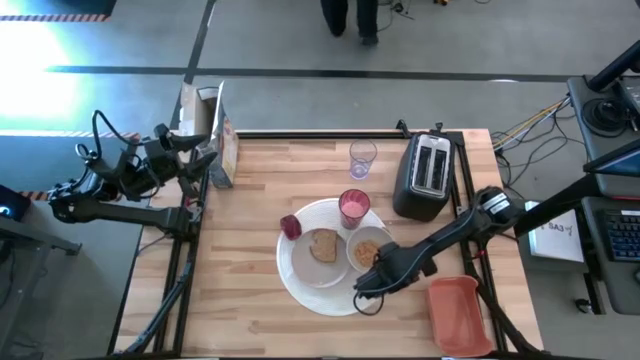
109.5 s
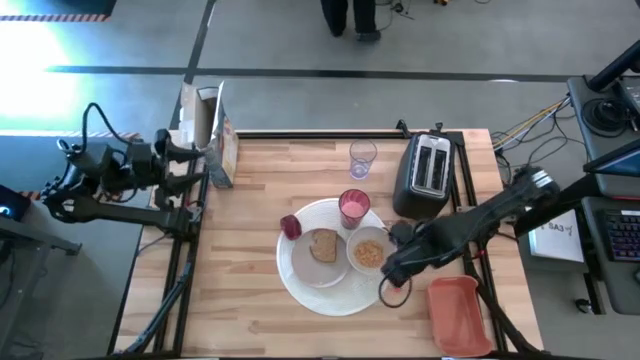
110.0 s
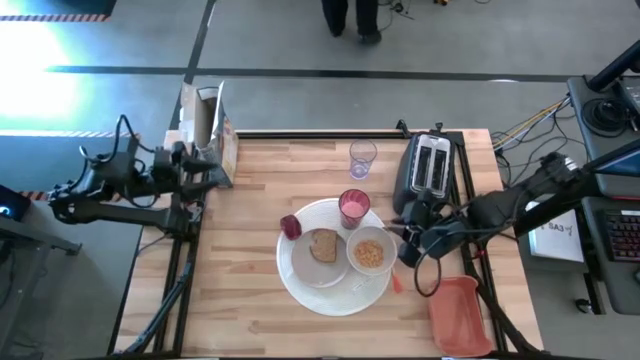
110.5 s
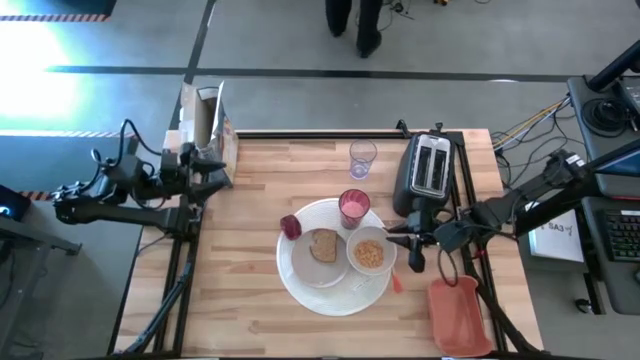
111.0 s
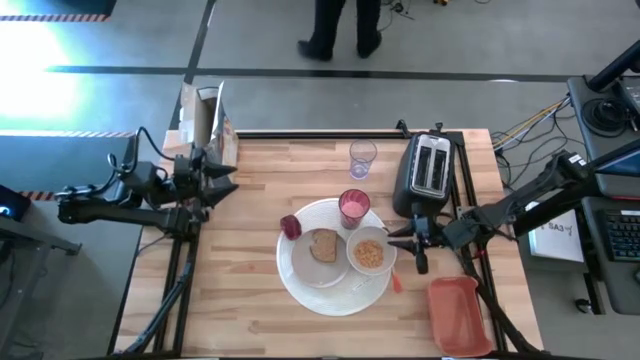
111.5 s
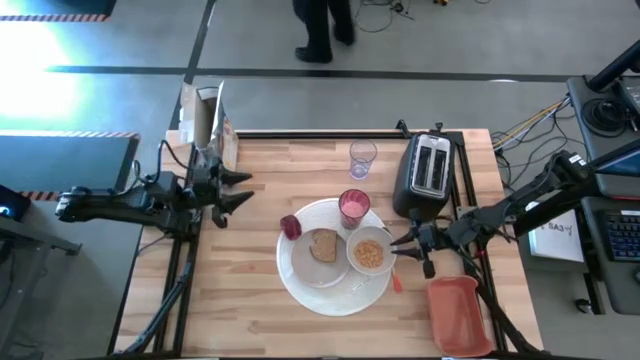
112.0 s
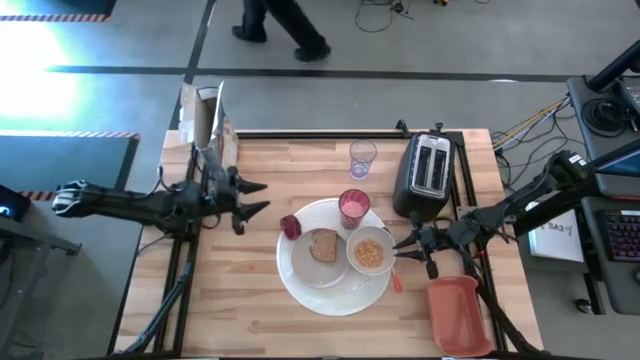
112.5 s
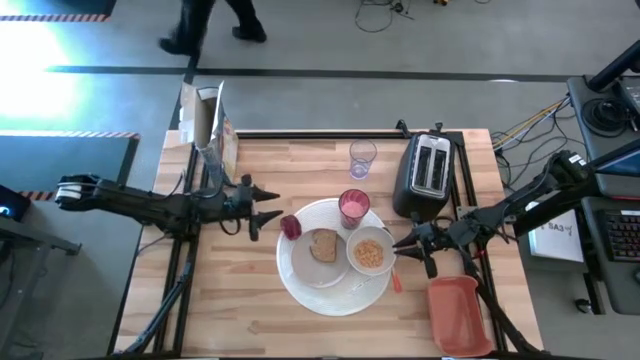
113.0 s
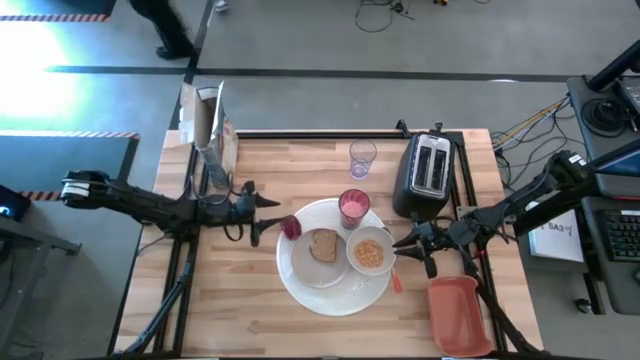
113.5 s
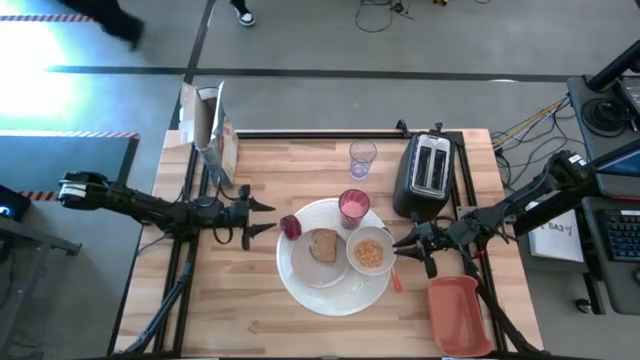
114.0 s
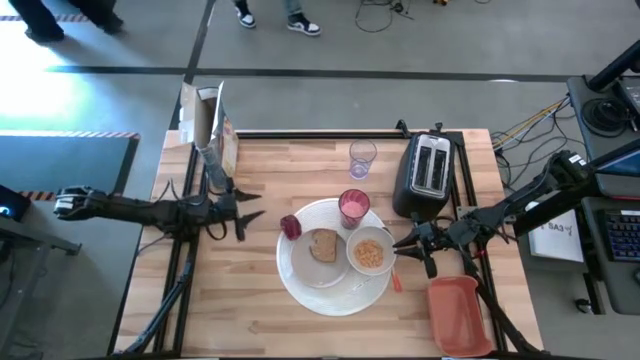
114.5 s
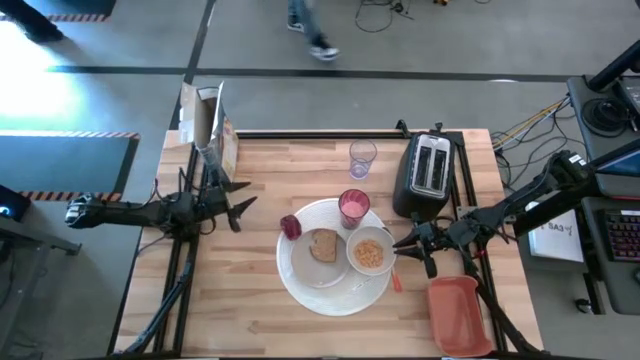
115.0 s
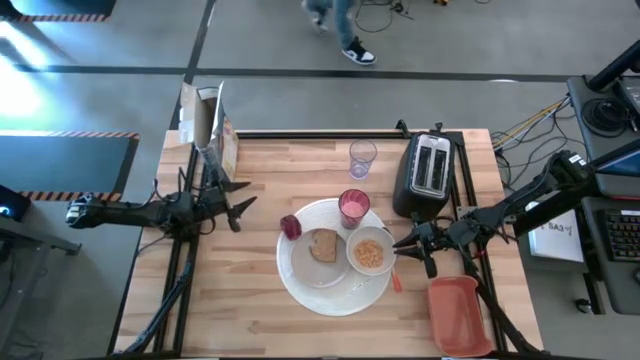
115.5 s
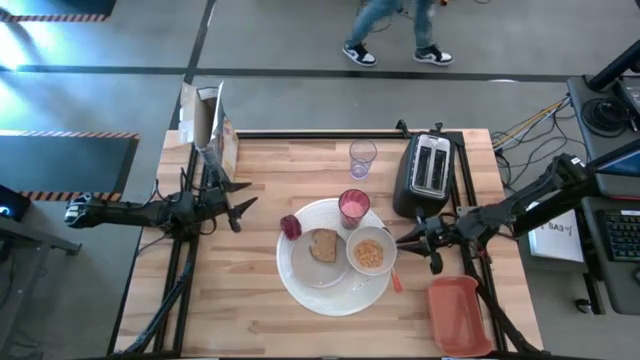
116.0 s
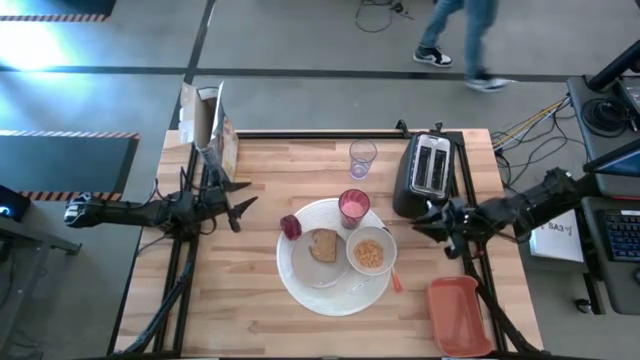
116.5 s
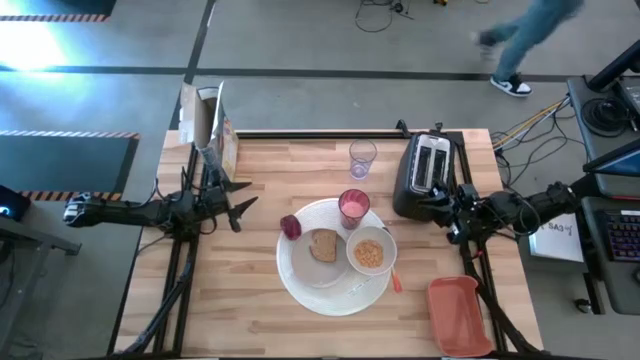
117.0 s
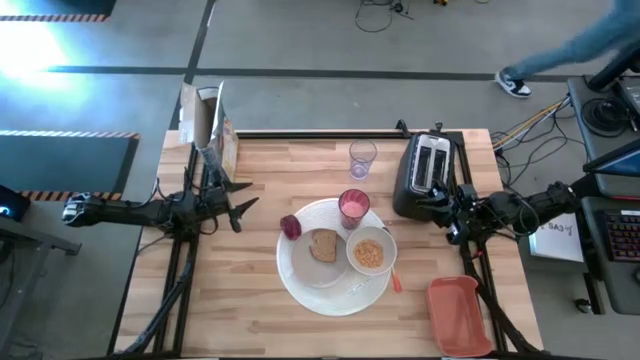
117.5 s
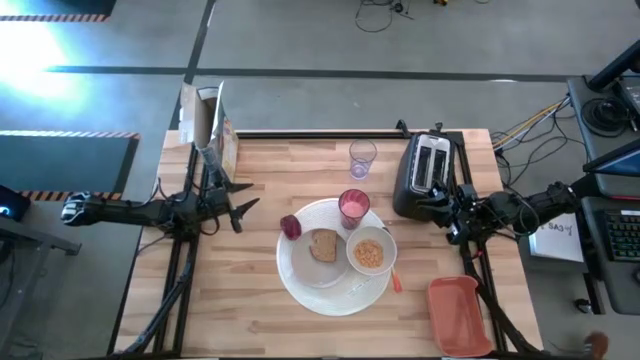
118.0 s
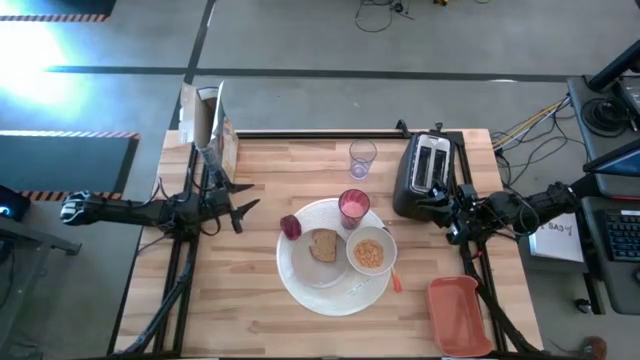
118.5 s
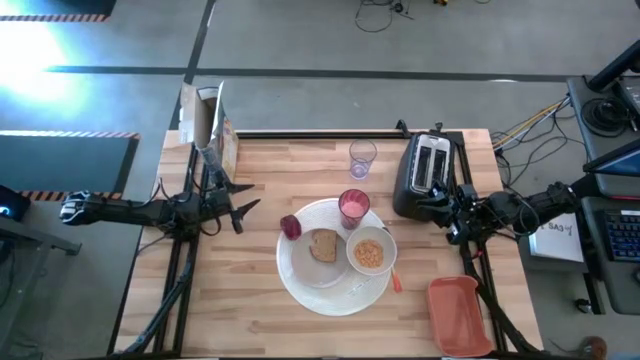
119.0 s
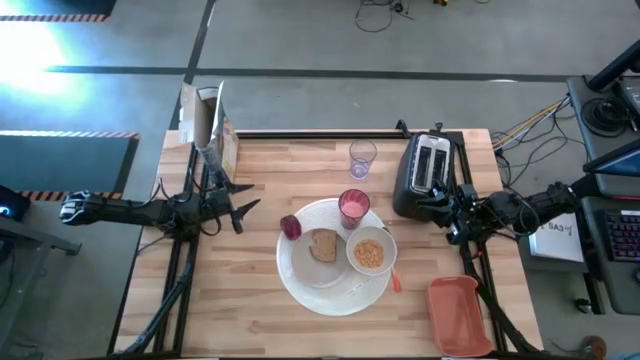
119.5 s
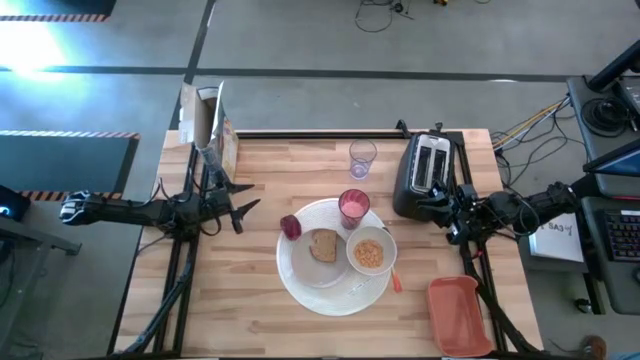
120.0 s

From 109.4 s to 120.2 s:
Task: Arrange a breakfast setting
Return to Home Position

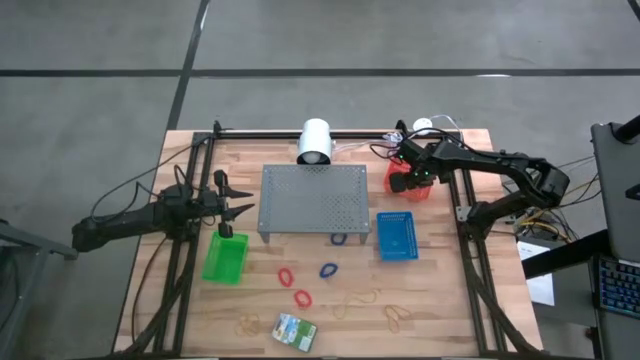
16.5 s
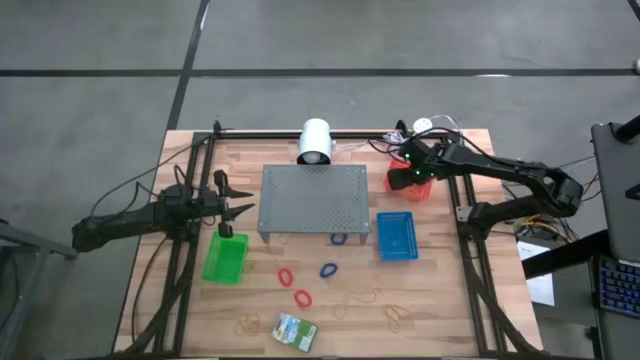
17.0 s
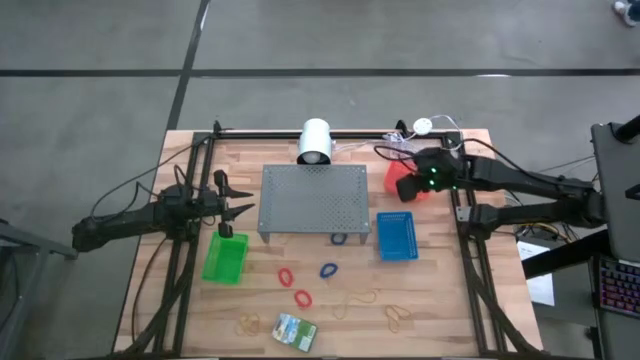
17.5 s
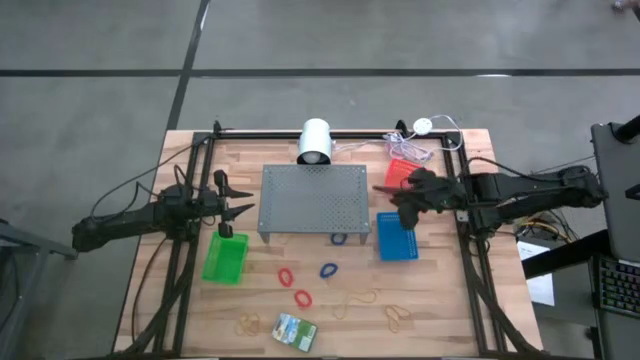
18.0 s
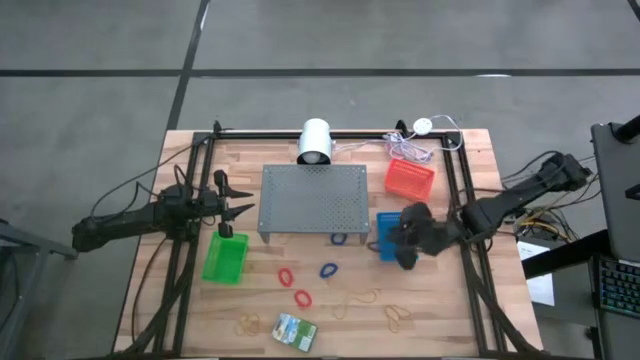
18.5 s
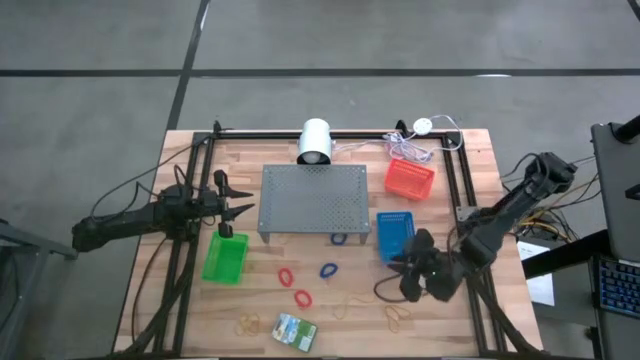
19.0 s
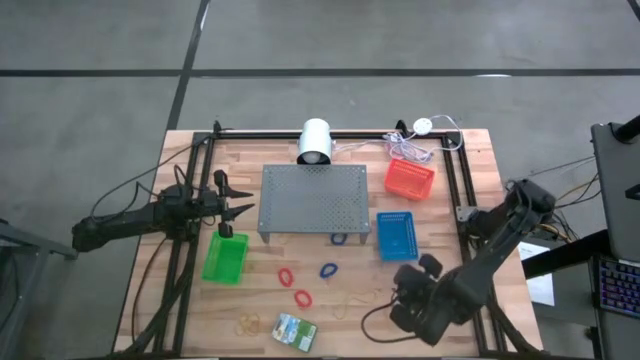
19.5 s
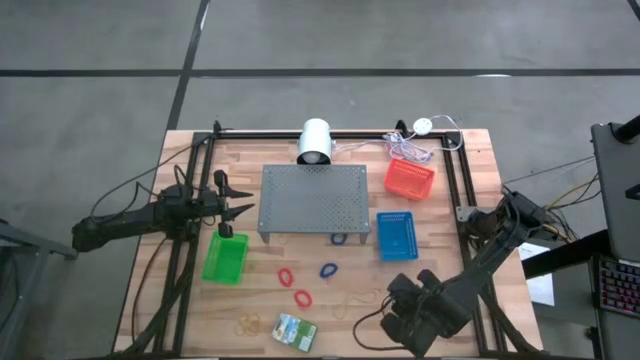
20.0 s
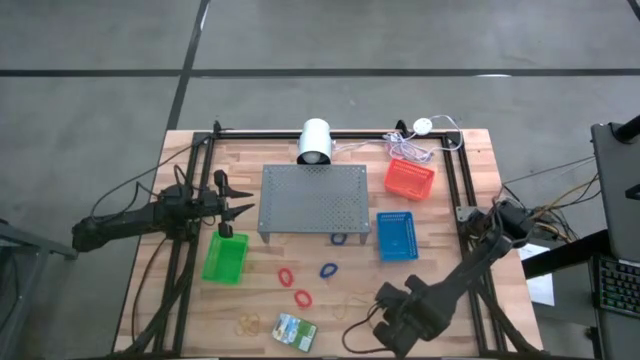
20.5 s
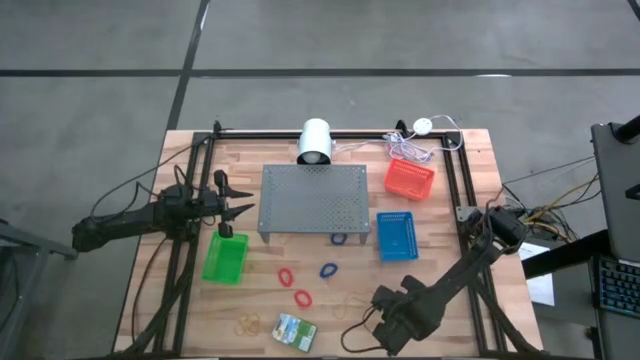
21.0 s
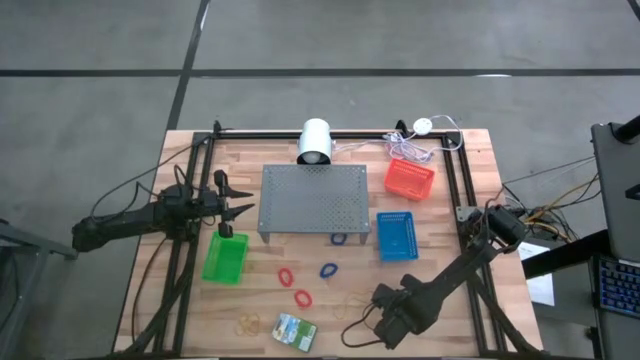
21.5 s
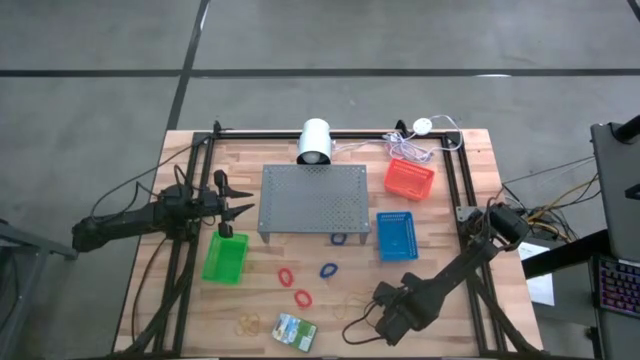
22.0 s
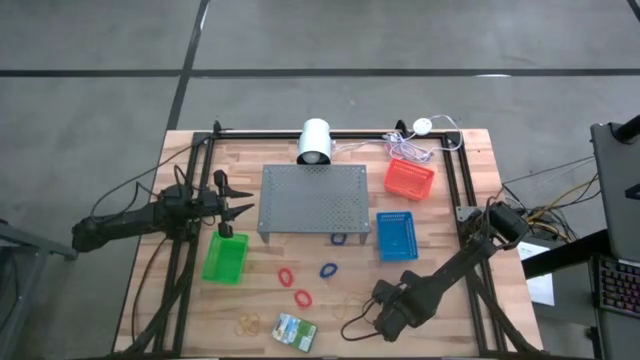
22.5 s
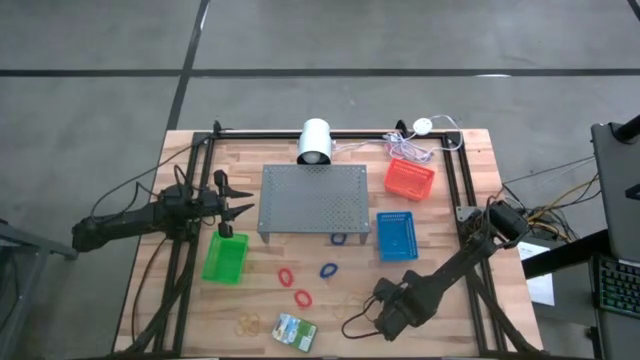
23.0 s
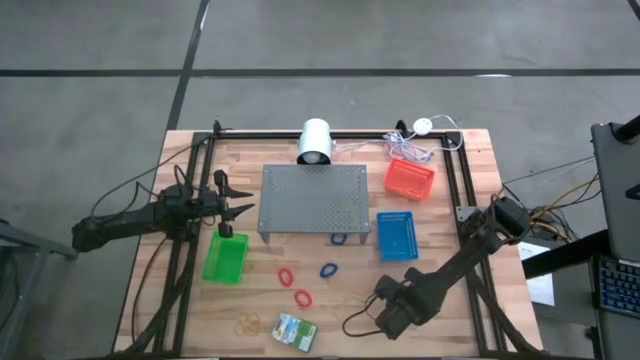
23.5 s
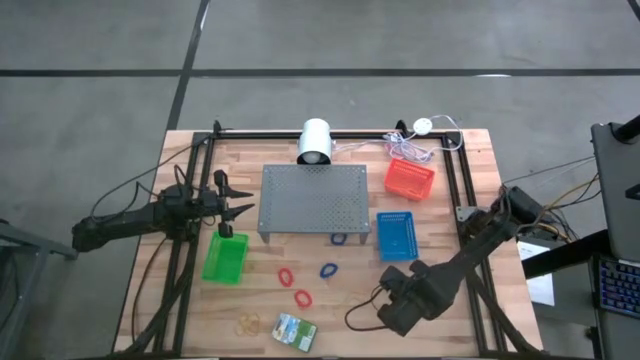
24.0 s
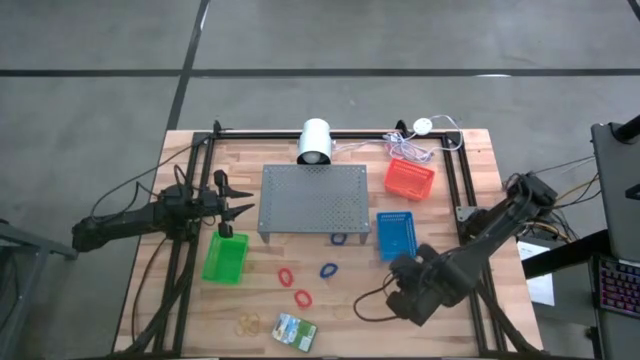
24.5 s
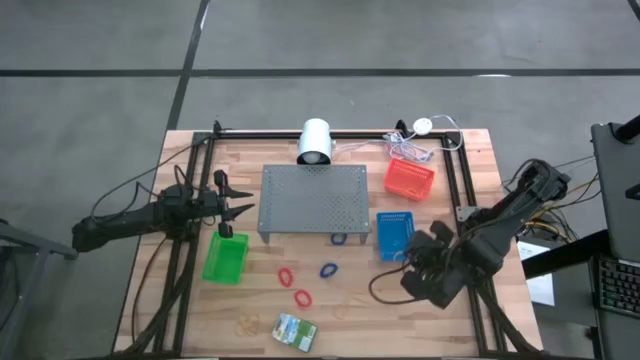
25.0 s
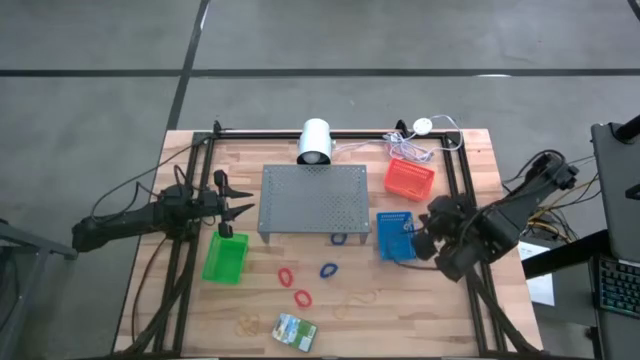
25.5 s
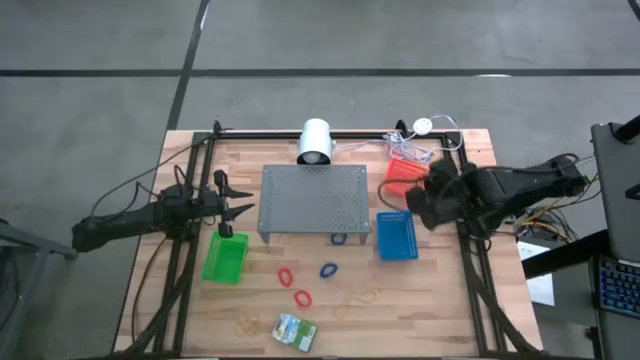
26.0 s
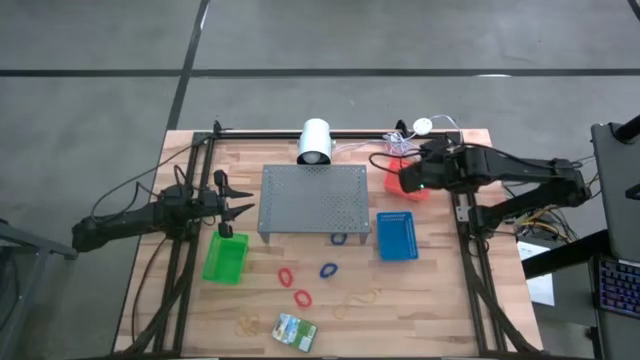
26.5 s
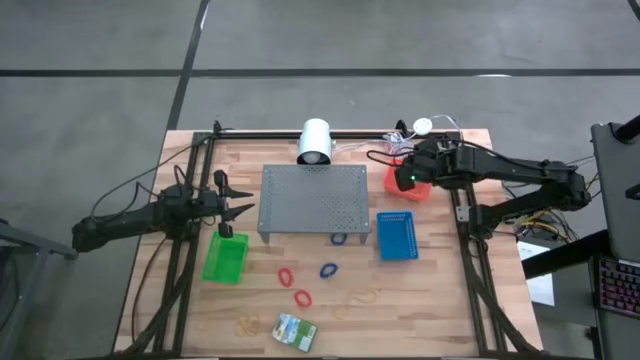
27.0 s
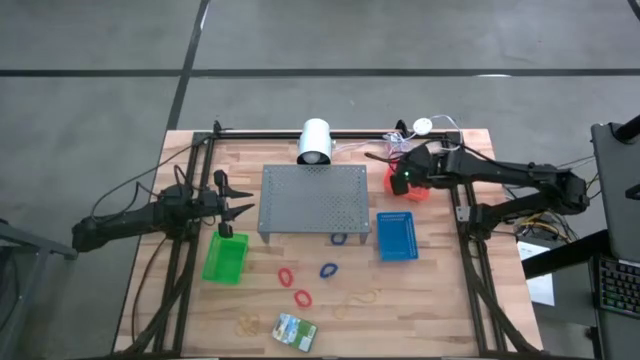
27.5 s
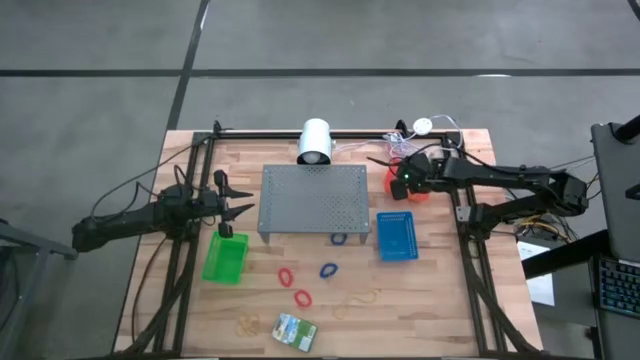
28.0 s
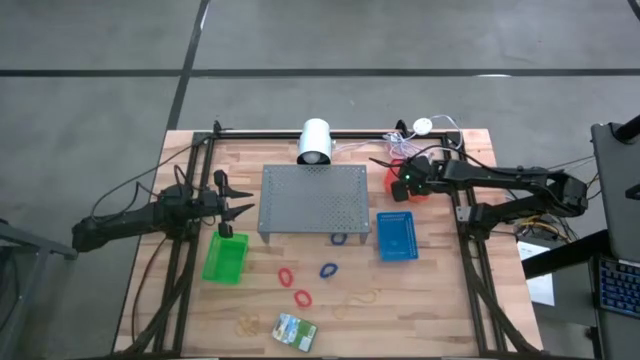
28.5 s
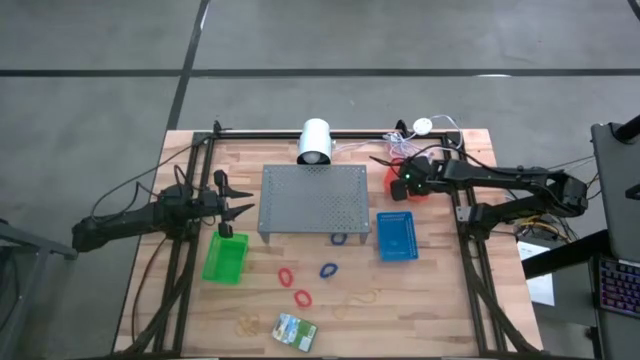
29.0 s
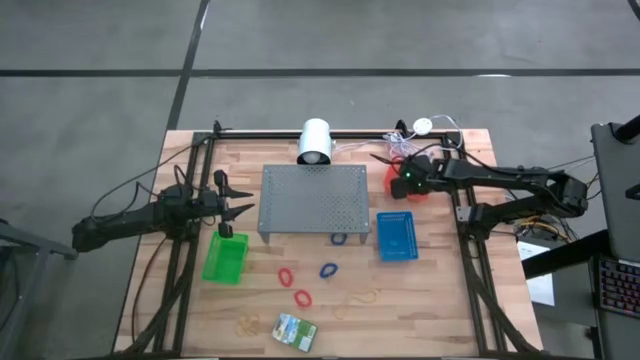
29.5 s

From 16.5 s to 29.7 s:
Task: Pick & Place Office Desk Supplies
Put the yellow rubber band into the orange bin
